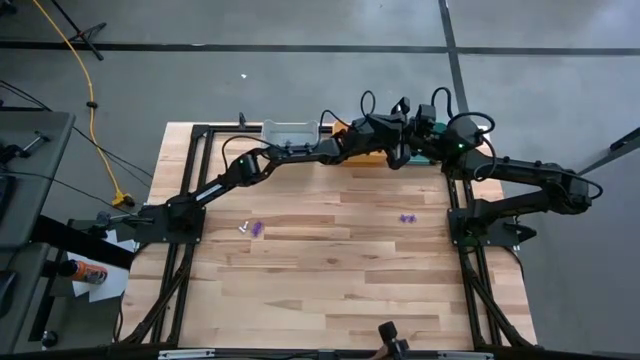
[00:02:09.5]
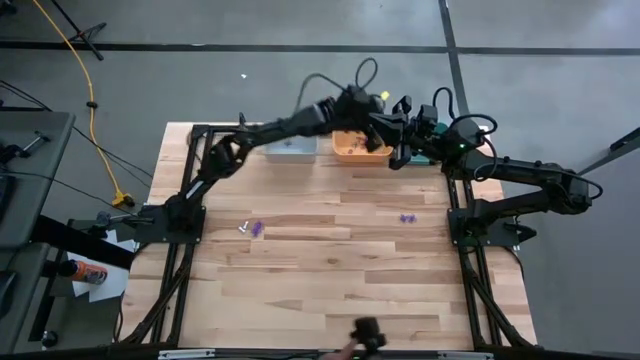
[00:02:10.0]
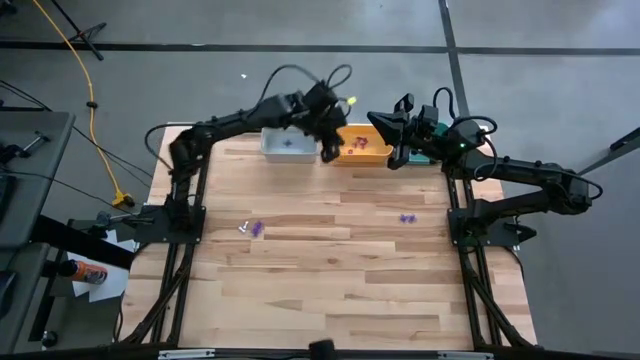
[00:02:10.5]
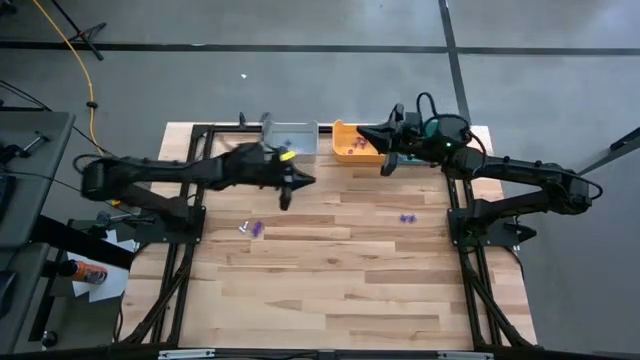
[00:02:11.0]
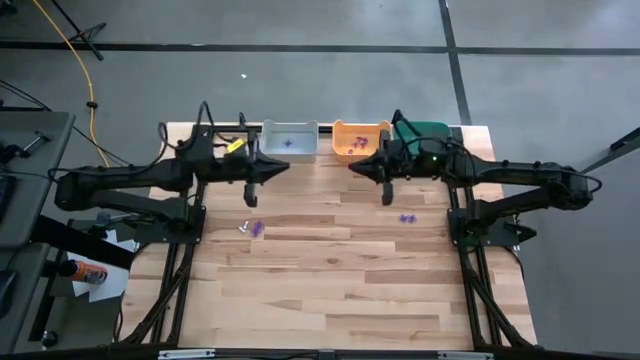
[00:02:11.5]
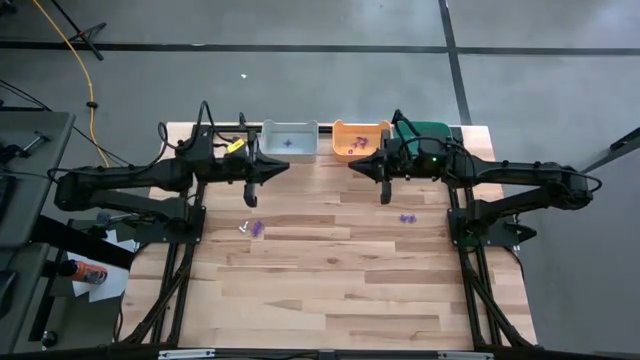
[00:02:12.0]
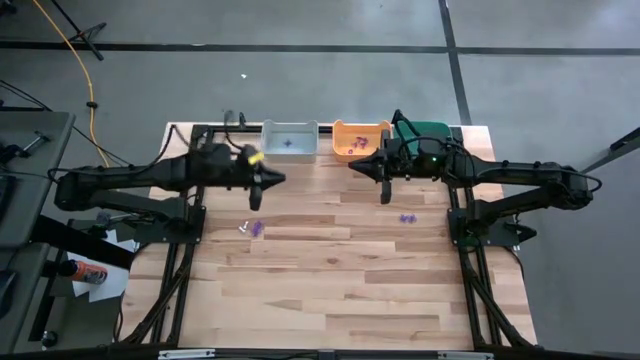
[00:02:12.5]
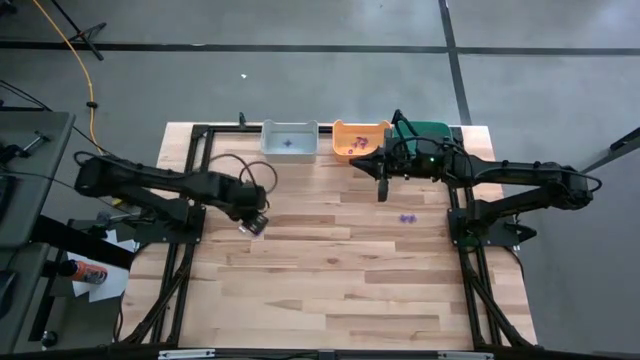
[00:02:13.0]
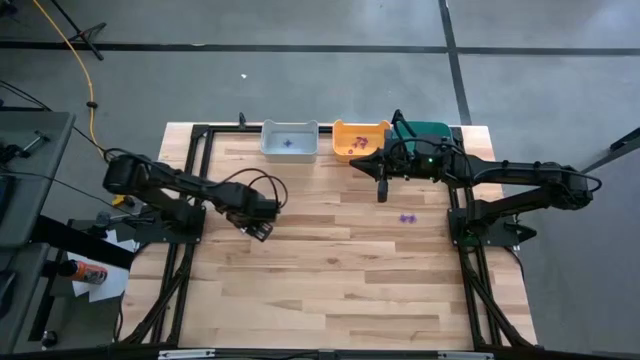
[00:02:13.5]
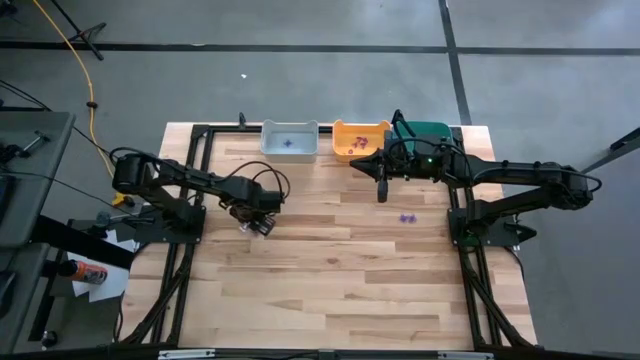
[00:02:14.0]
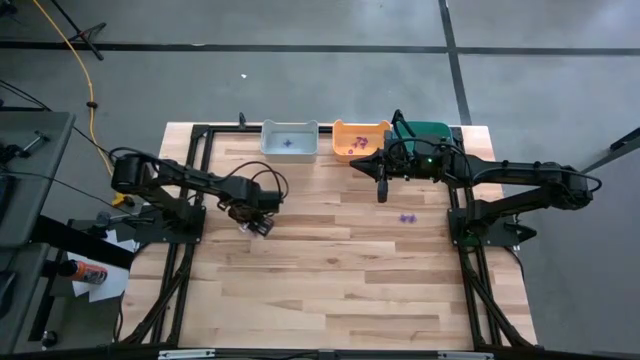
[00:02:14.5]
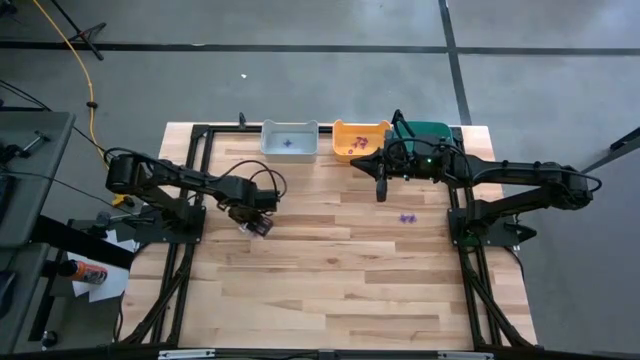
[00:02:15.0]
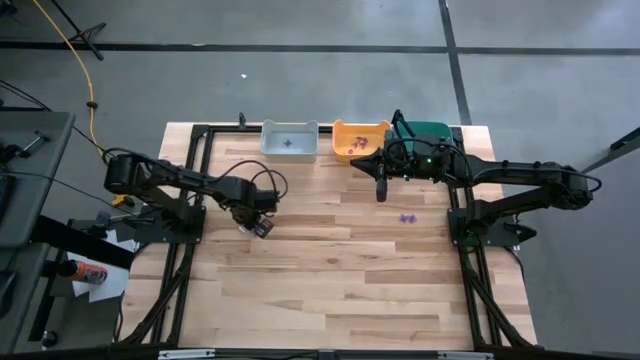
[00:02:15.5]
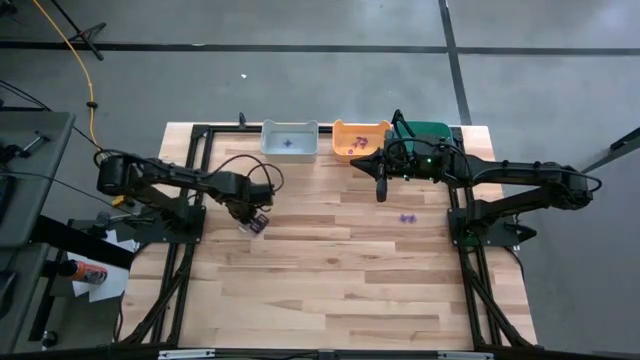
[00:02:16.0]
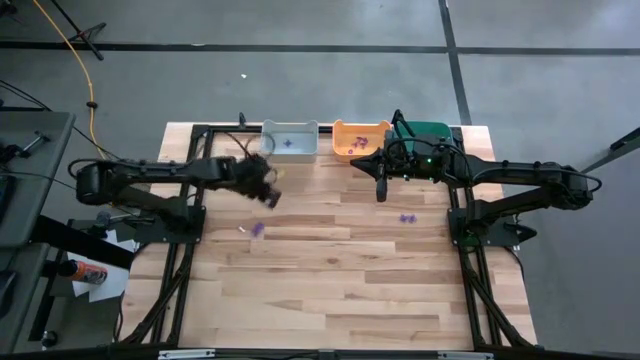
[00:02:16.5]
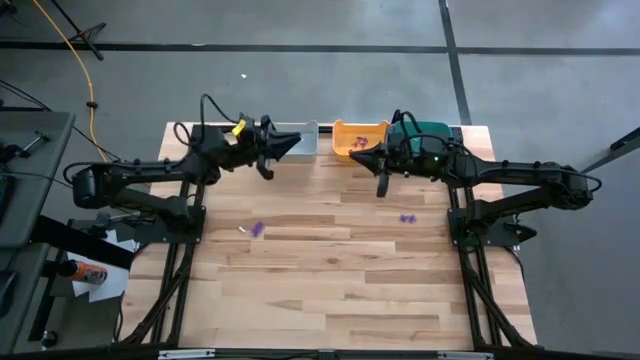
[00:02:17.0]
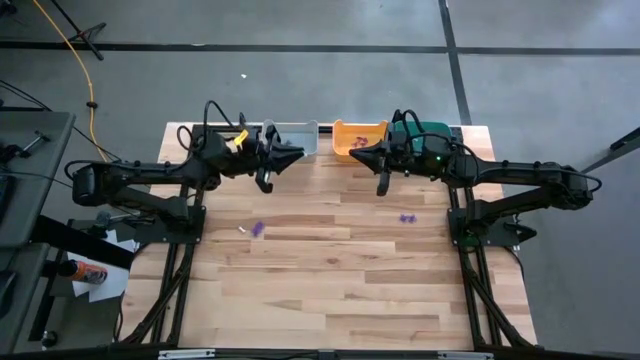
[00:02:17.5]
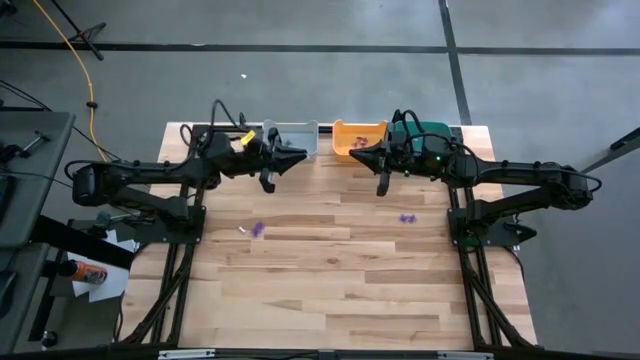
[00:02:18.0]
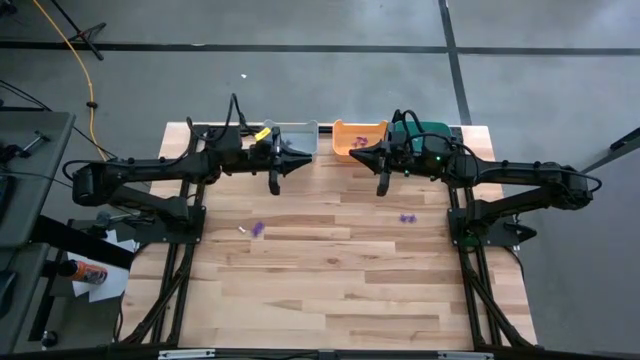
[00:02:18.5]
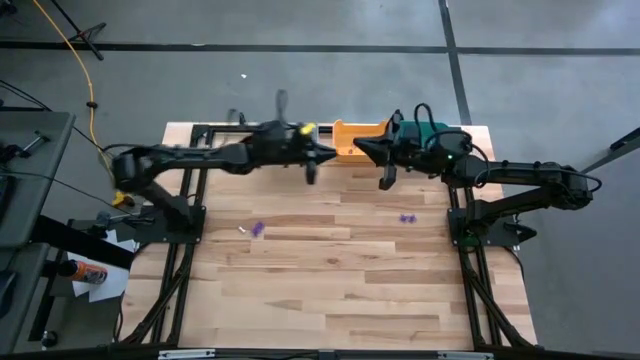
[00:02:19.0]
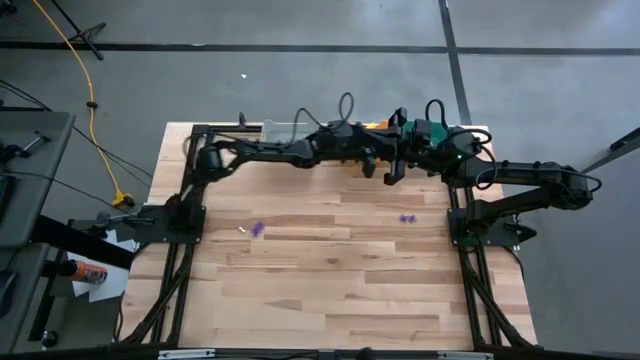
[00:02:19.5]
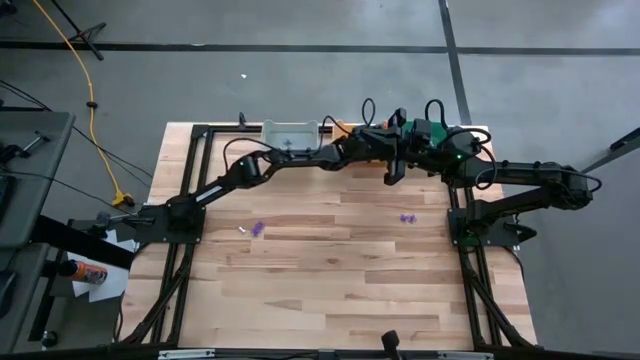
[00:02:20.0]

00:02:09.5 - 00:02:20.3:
Task: Sort Halloween decoration
Put the white bone toy into the green bin

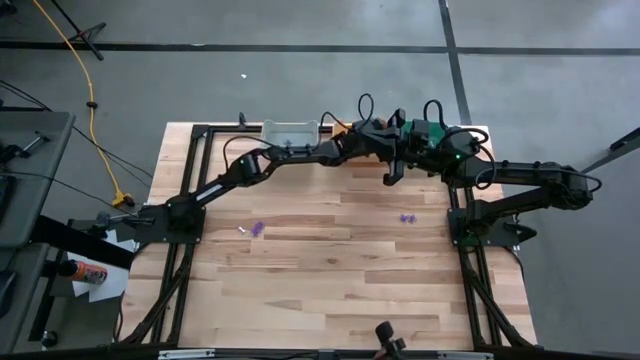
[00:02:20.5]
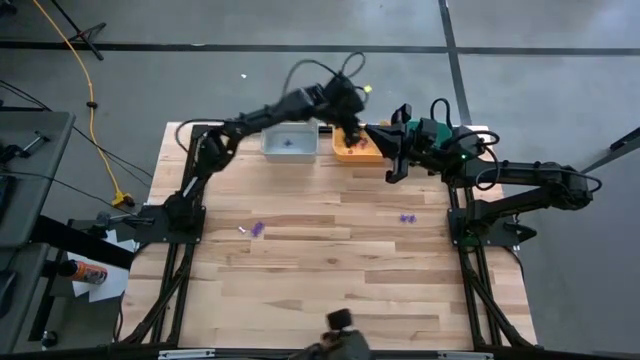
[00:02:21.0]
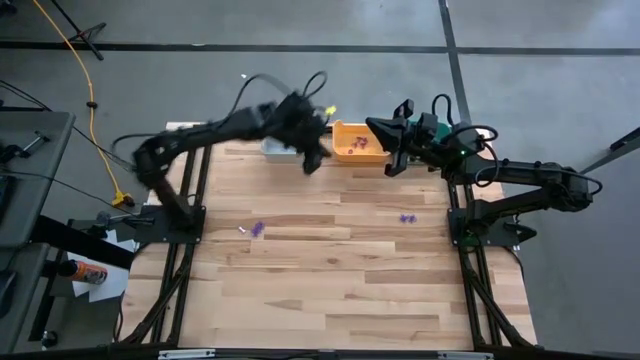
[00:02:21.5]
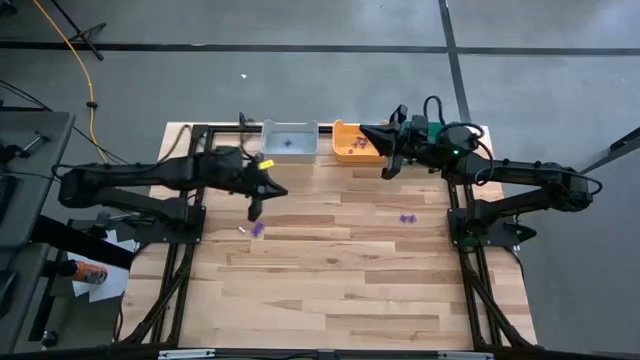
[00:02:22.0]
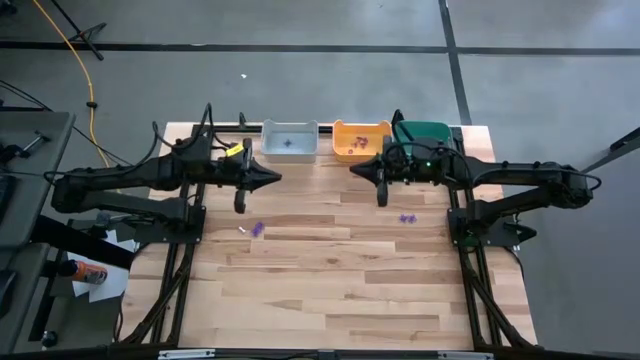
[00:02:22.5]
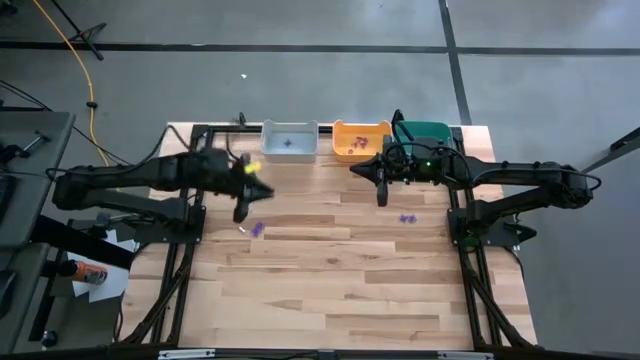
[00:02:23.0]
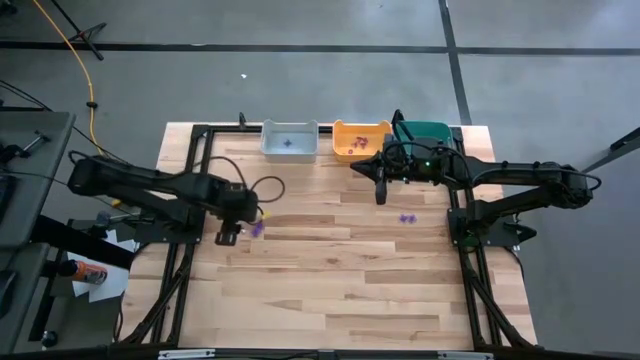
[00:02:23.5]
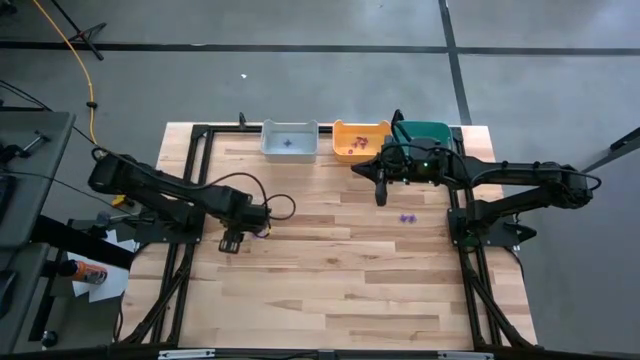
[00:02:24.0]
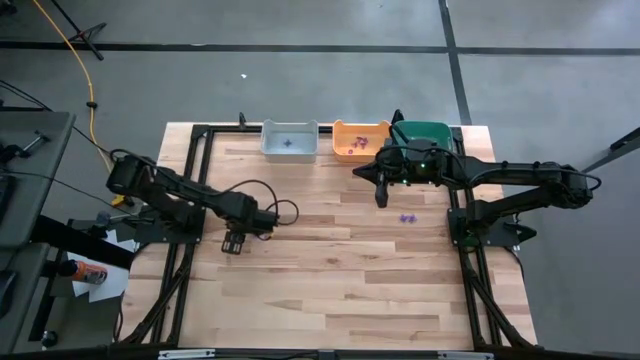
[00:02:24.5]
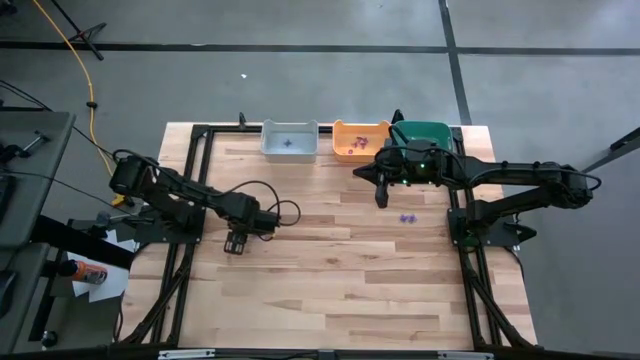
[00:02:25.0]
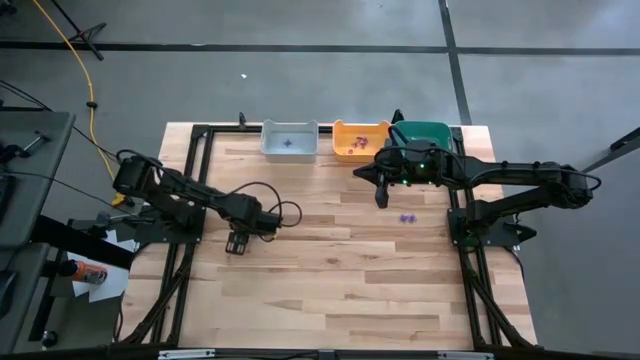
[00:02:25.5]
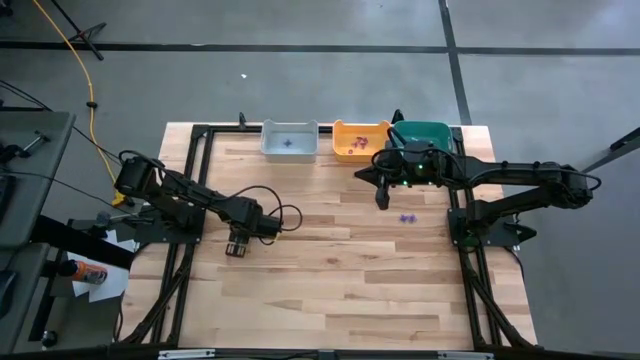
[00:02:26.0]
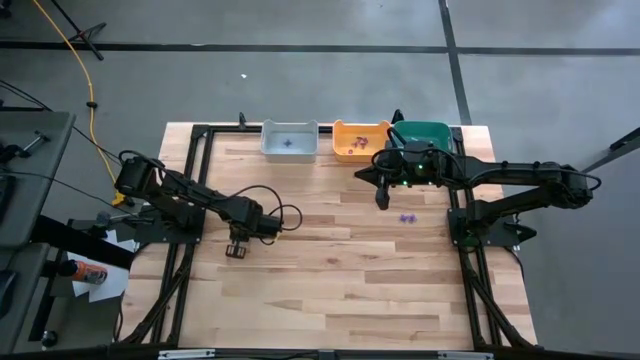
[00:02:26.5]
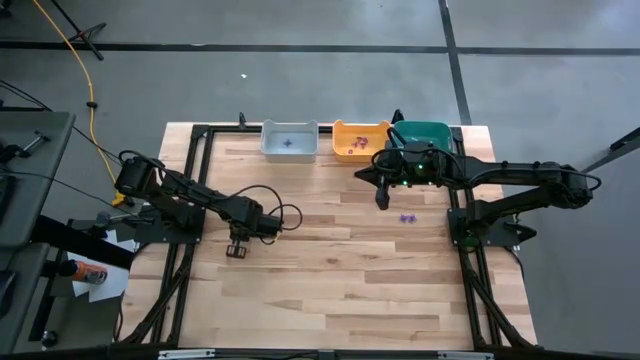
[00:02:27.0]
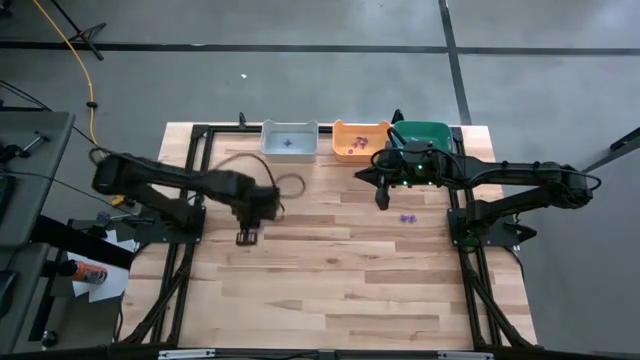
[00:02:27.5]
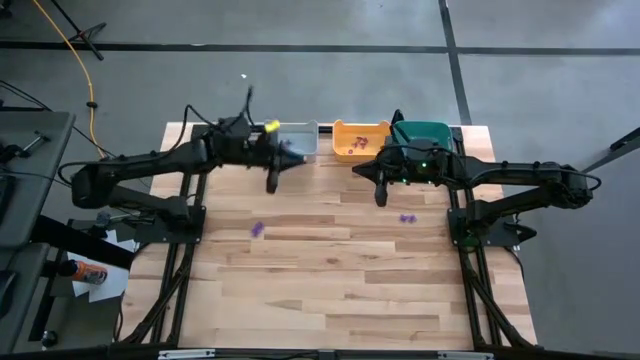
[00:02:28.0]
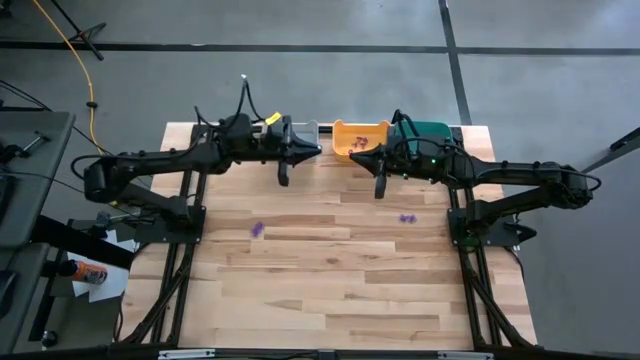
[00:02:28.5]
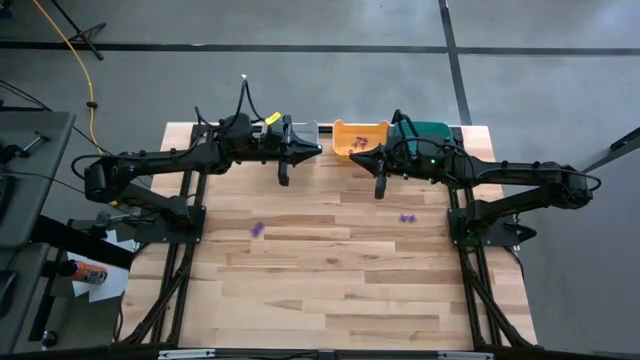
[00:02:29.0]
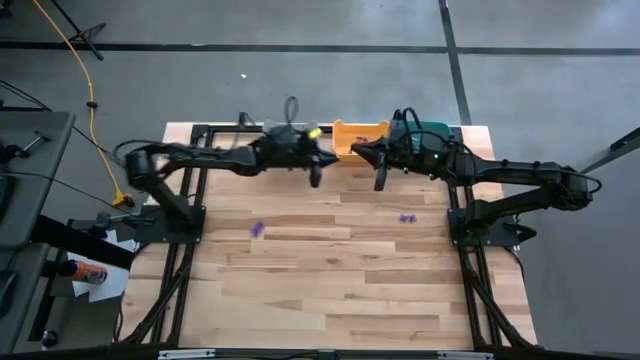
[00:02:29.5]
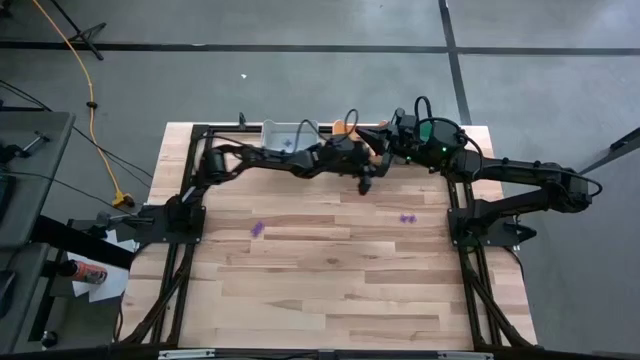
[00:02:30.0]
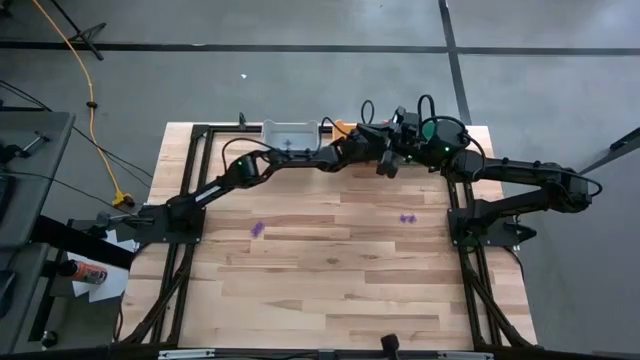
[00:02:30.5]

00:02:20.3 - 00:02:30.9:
Put the white bone toy into the green bin
